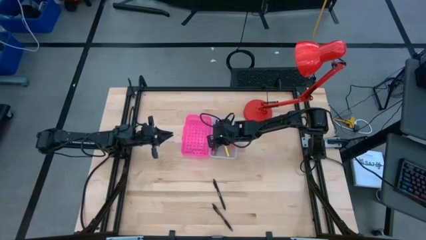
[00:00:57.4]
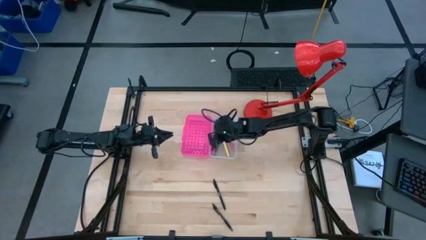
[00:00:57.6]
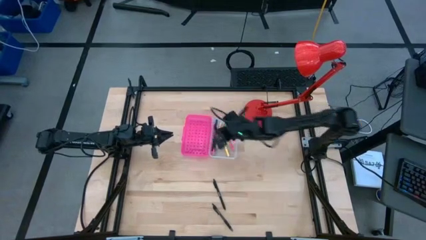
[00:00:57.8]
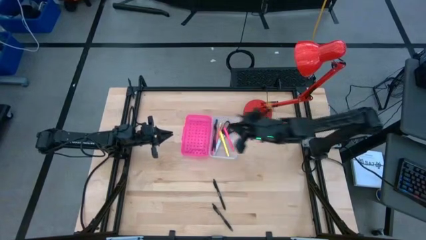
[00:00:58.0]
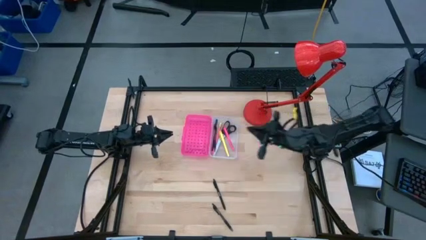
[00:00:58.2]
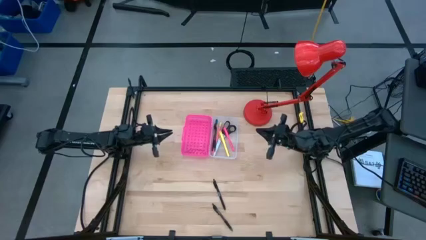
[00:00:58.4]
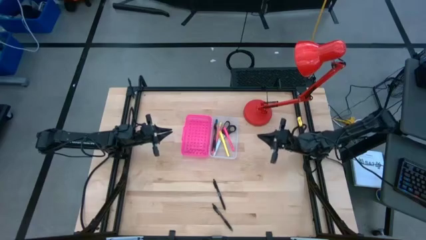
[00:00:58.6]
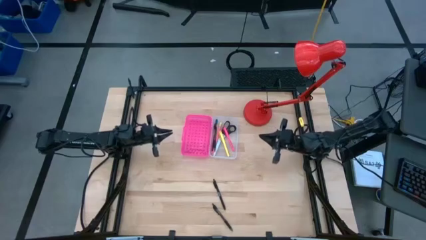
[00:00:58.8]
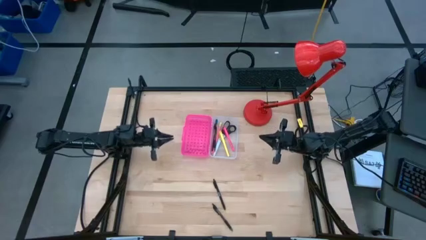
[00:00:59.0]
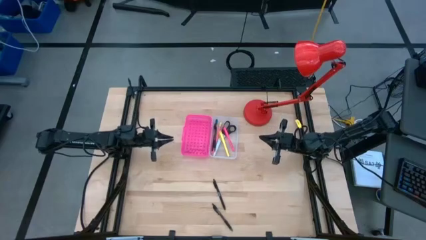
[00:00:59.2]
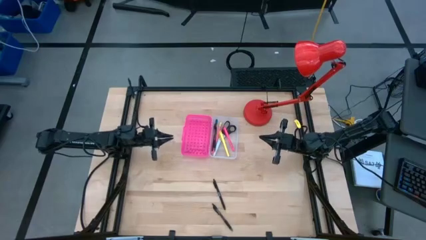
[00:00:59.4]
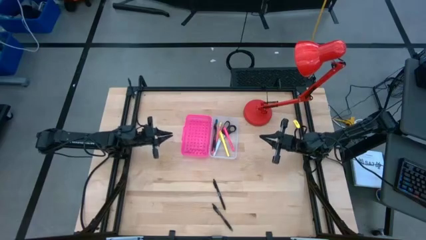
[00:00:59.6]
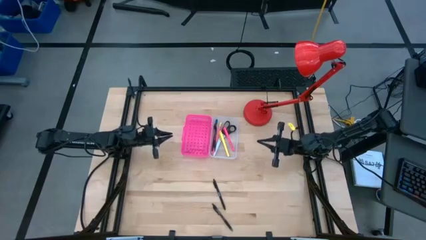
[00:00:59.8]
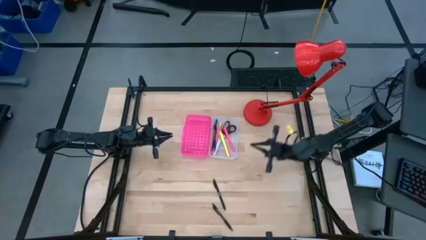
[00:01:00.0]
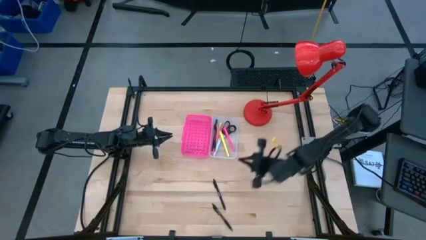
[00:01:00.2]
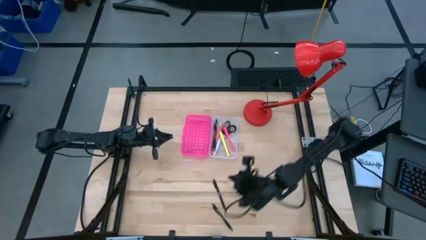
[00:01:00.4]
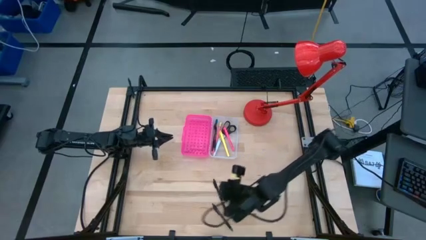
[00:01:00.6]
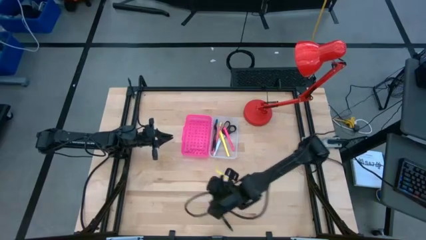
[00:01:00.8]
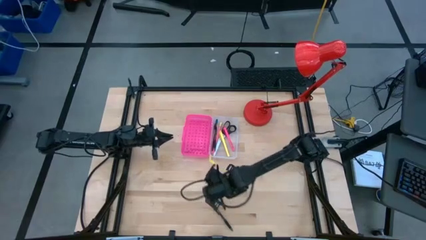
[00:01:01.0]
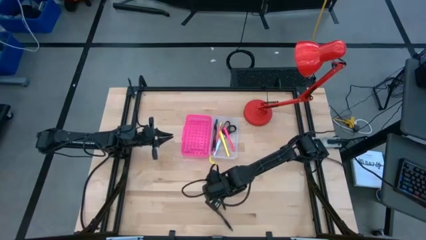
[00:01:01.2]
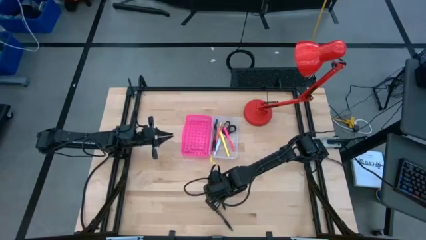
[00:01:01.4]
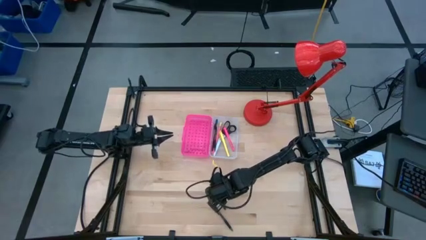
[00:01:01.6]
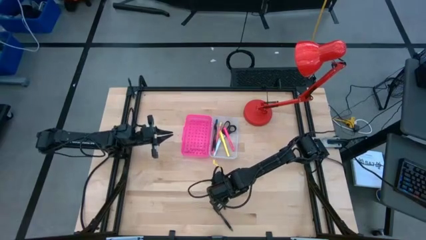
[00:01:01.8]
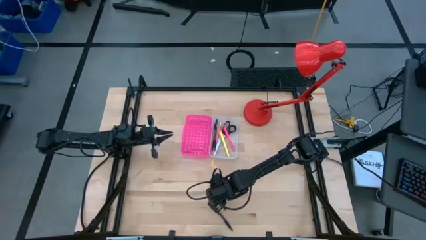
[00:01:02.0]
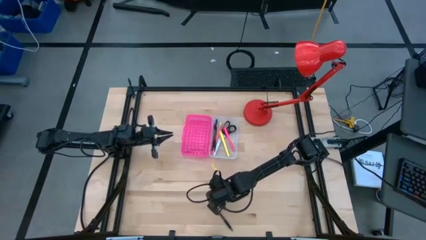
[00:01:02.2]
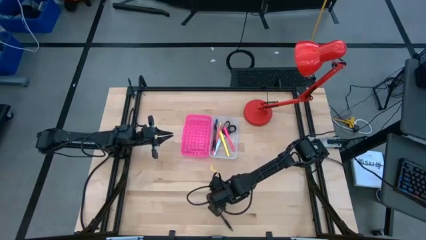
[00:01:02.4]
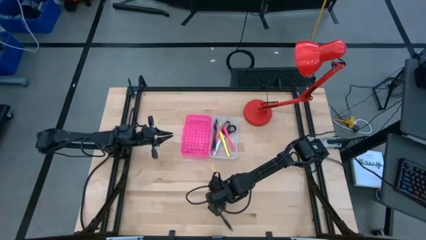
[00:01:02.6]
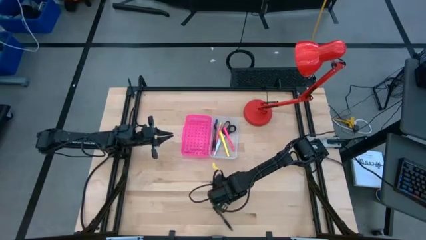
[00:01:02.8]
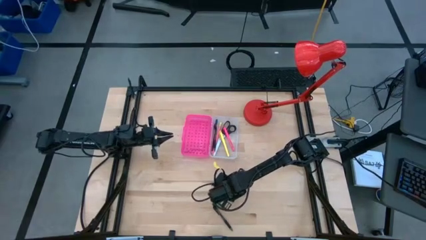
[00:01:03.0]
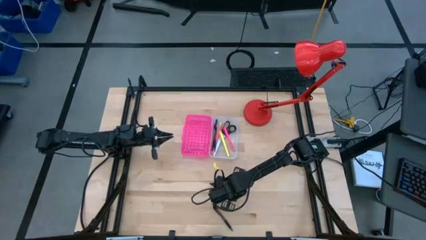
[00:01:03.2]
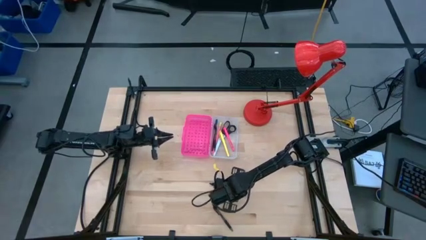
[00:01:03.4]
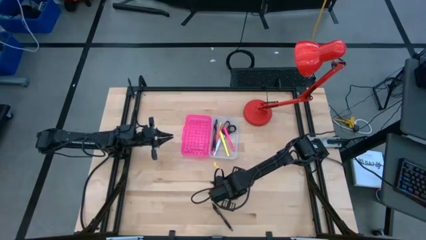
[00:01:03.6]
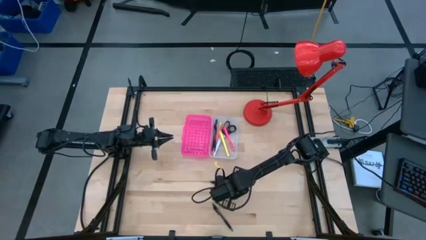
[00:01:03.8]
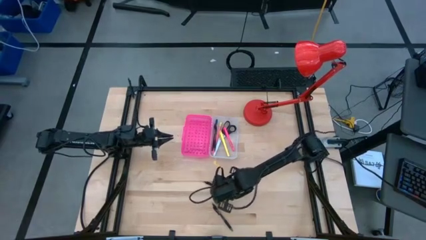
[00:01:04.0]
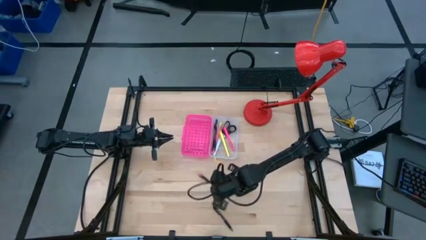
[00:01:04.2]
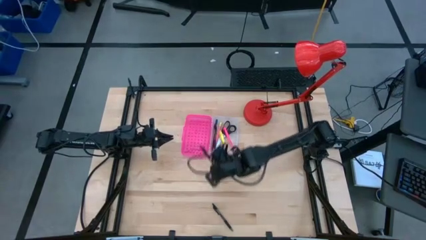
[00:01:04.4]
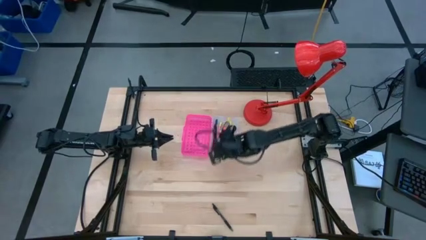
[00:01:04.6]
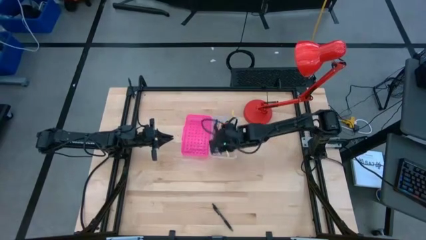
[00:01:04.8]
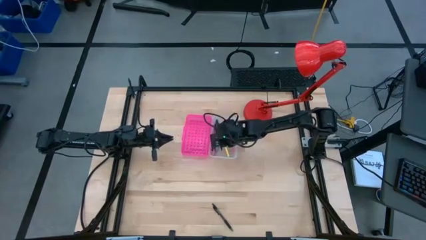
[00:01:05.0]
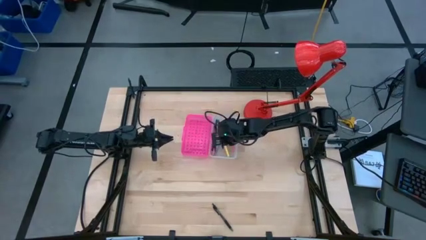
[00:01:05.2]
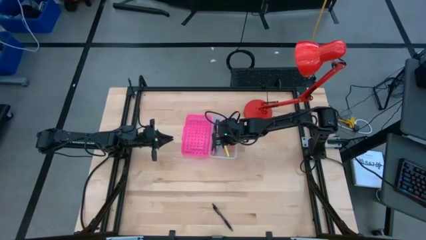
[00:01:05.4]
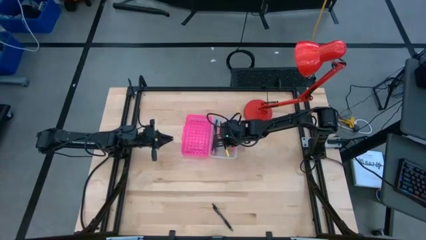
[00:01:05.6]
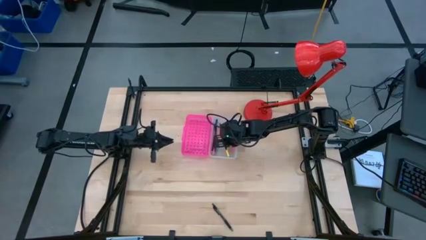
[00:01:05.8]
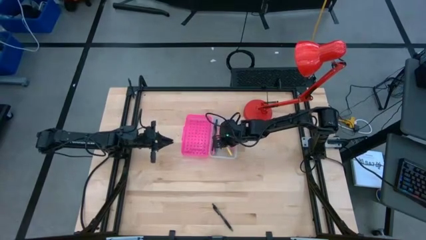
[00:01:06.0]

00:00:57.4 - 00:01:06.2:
Task: Pick & place school supplies into a supply box
Put the top black ballpen into the pink supply box

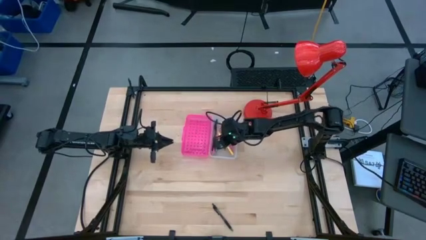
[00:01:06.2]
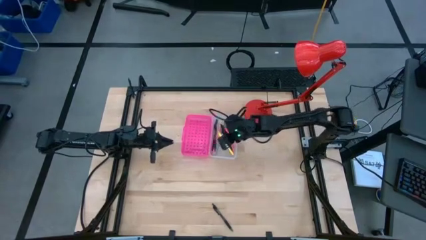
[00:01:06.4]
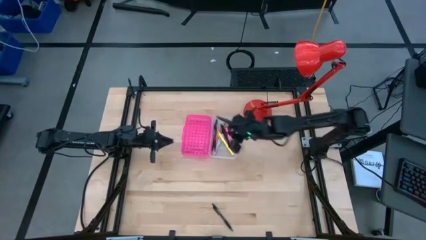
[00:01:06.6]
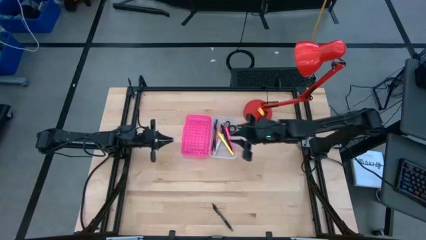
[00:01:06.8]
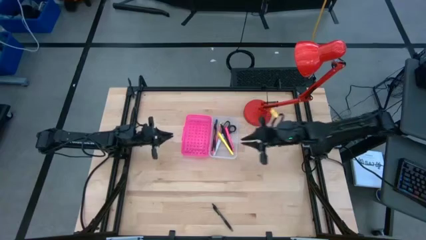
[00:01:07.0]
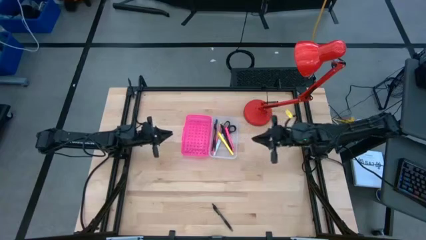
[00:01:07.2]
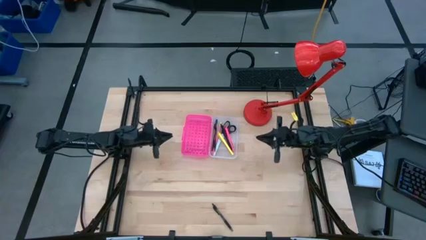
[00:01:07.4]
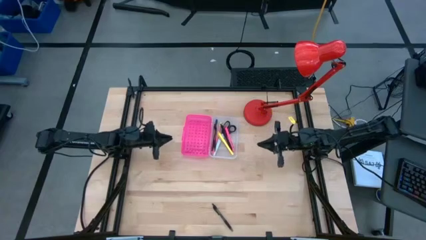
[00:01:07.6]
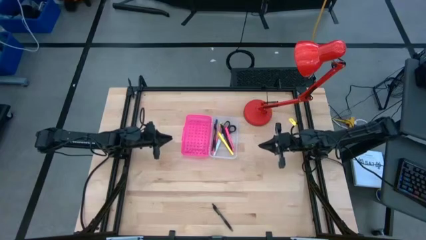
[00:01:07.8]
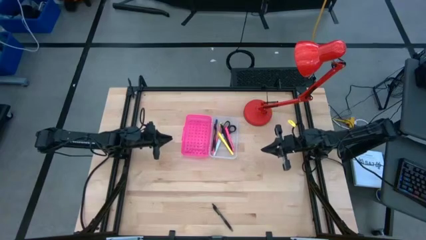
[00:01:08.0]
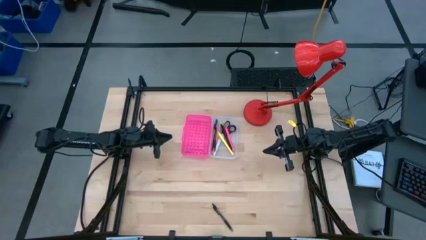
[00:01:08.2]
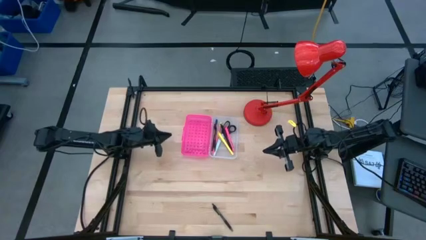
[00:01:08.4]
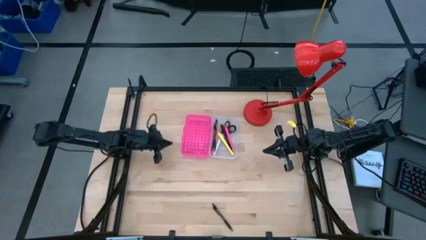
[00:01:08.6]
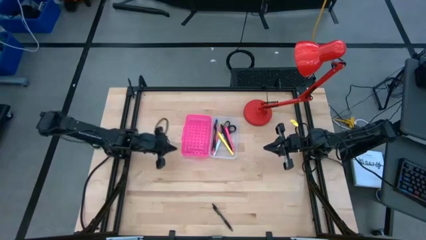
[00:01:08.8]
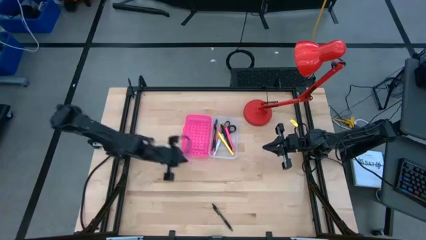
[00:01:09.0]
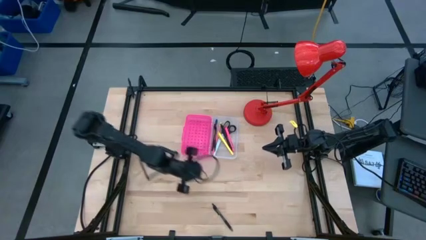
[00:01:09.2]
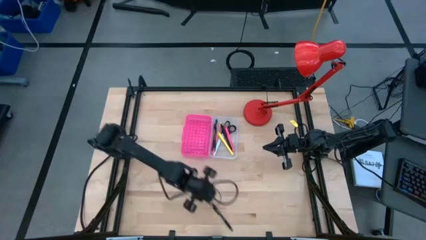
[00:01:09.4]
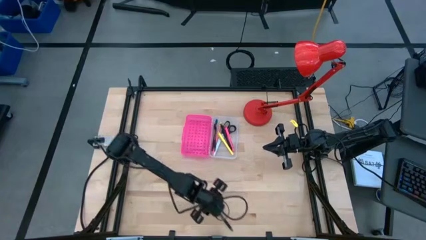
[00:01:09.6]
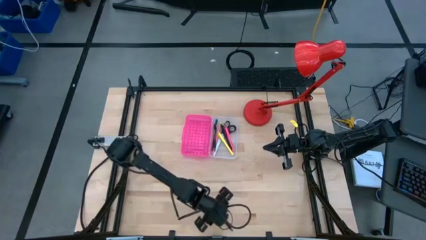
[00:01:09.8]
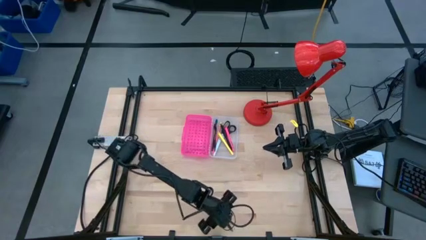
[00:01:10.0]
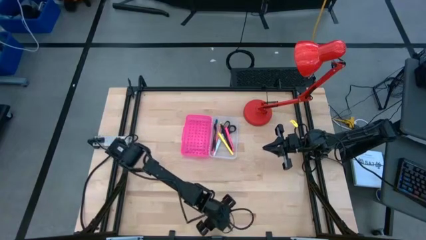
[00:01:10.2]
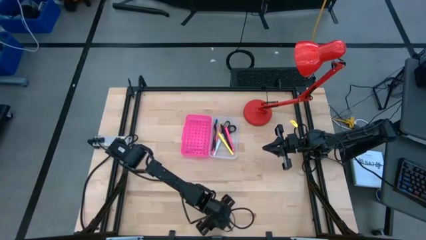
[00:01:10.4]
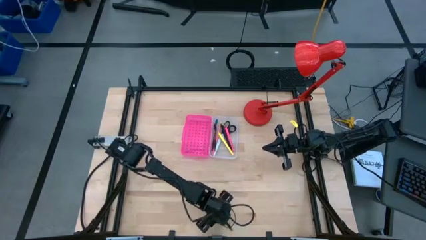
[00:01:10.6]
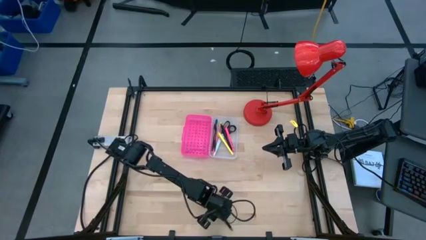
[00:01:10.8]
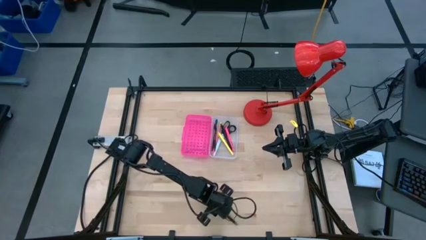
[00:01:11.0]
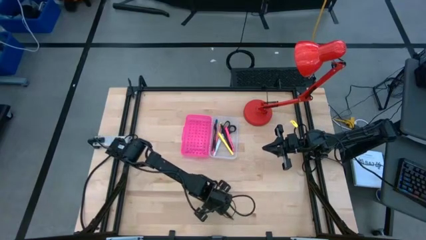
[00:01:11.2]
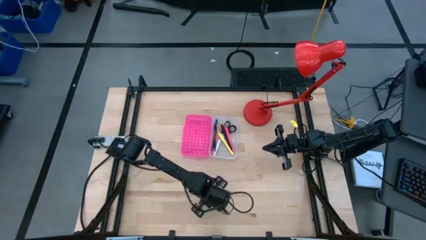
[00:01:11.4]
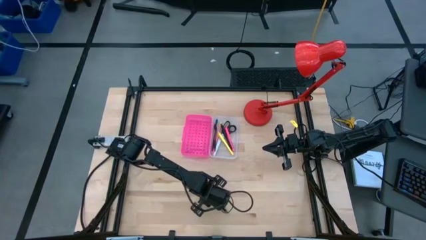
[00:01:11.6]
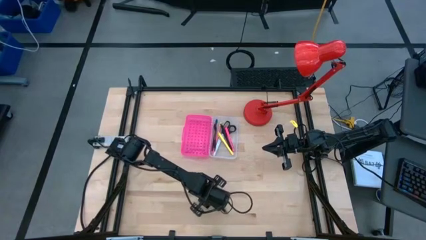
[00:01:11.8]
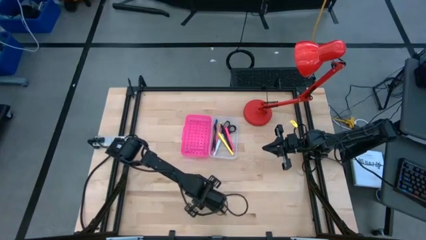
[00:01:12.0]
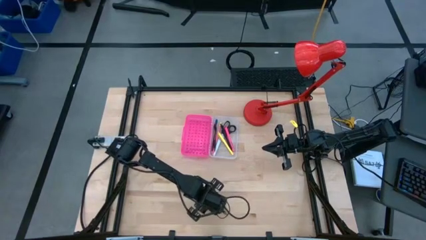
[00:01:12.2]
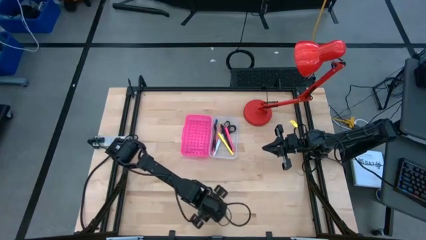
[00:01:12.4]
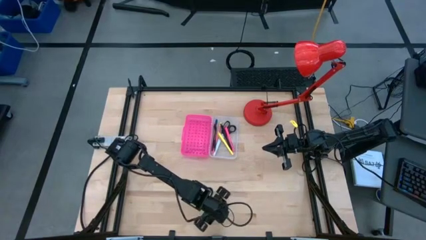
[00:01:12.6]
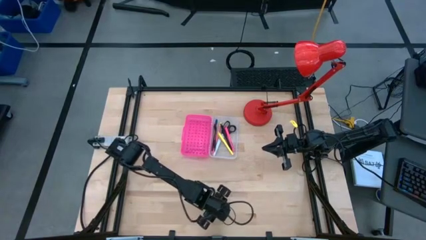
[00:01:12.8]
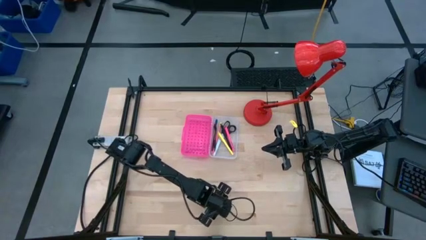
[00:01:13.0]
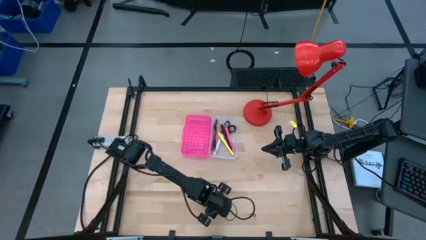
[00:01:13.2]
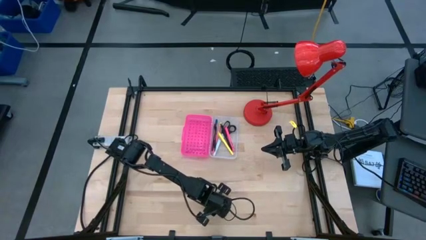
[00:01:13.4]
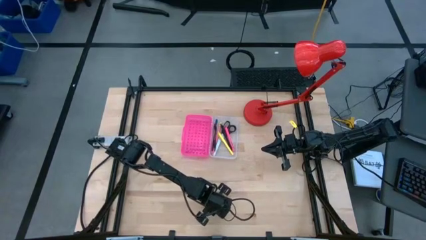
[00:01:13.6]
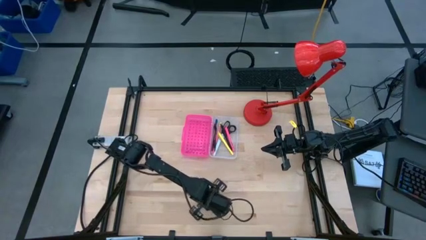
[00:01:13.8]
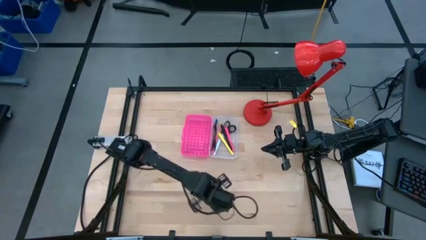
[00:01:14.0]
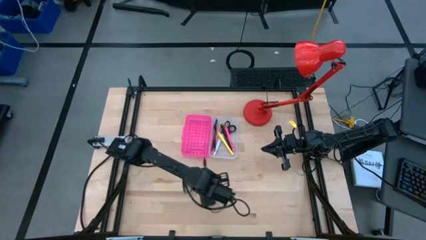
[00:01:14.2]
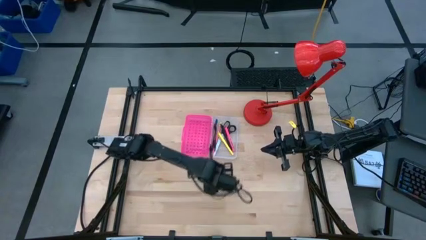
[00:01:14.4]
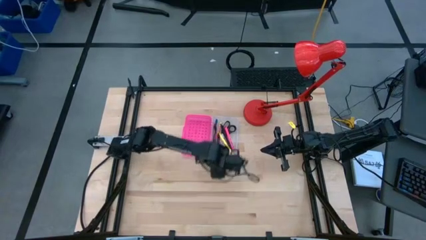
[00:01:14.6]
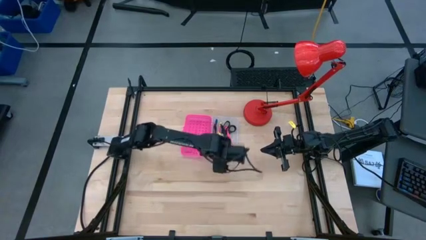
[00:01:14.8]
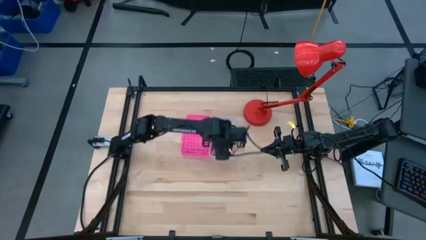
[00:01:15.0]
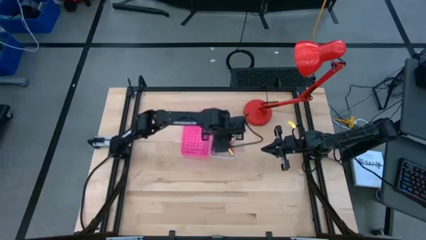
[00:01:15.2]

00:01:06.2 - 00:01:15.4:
Put the black ballpen into the pink supply box
